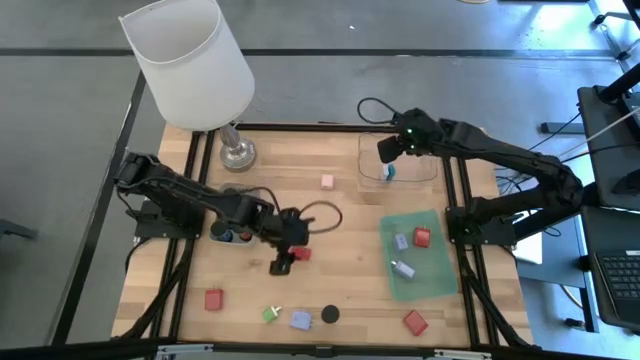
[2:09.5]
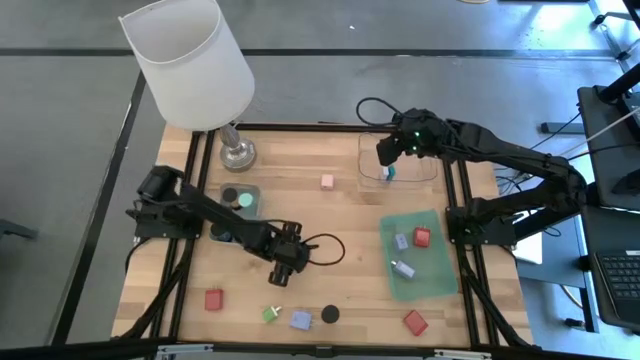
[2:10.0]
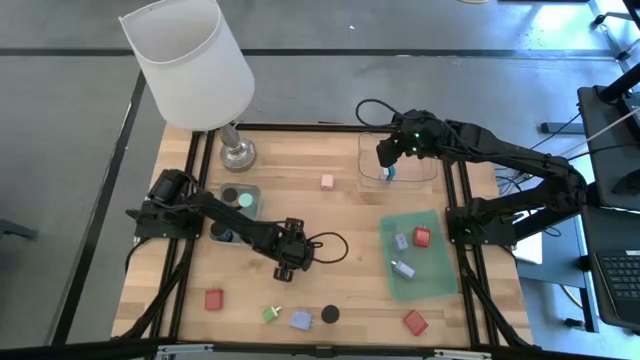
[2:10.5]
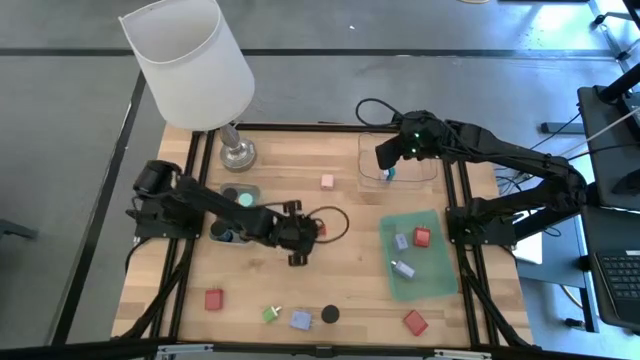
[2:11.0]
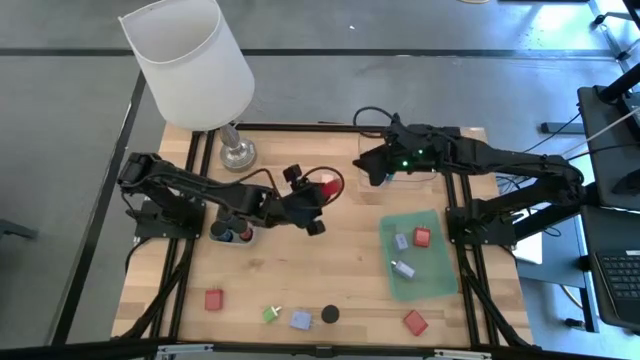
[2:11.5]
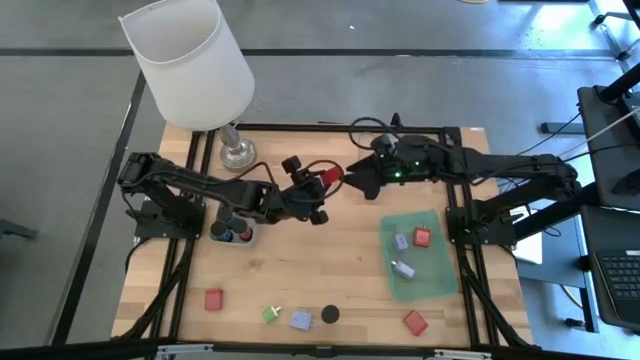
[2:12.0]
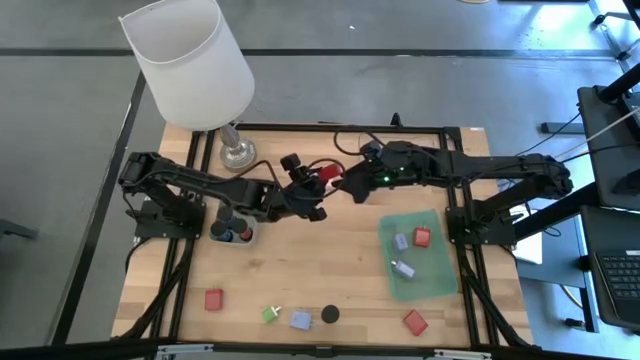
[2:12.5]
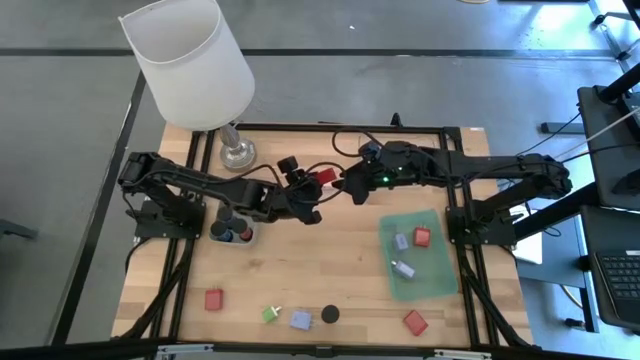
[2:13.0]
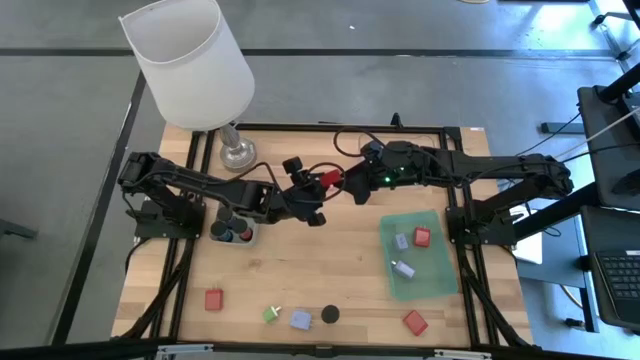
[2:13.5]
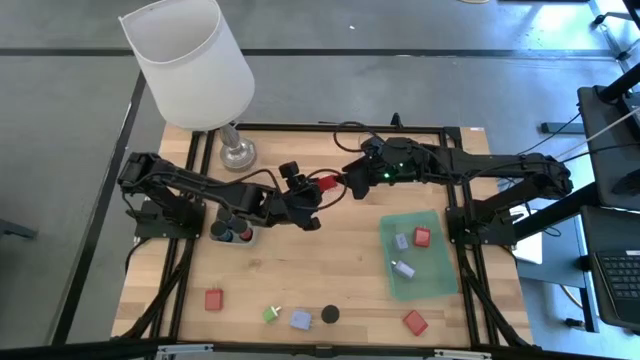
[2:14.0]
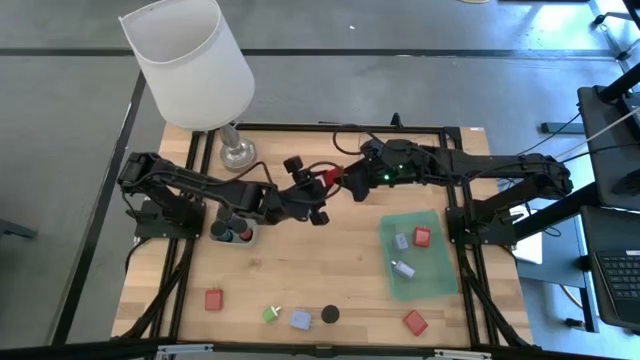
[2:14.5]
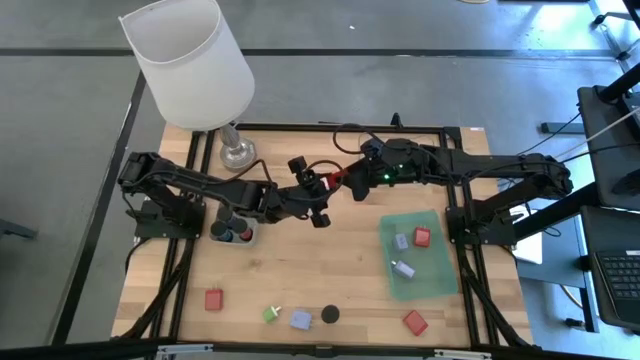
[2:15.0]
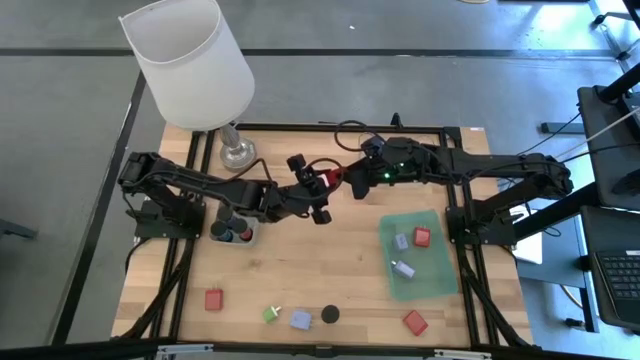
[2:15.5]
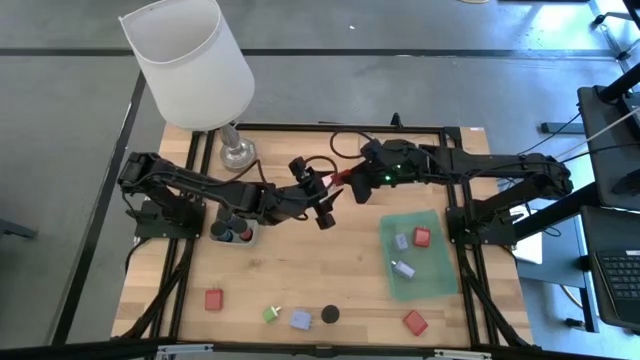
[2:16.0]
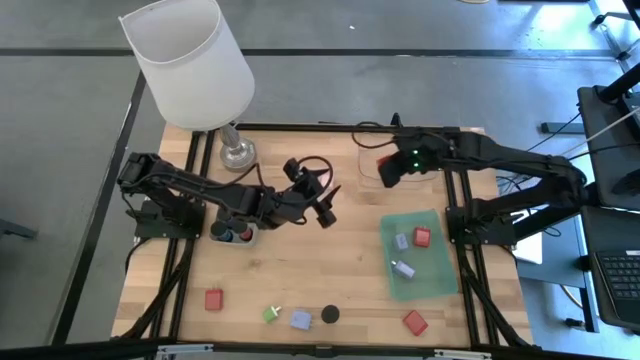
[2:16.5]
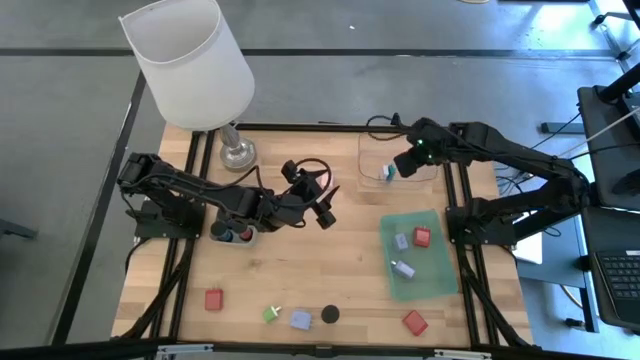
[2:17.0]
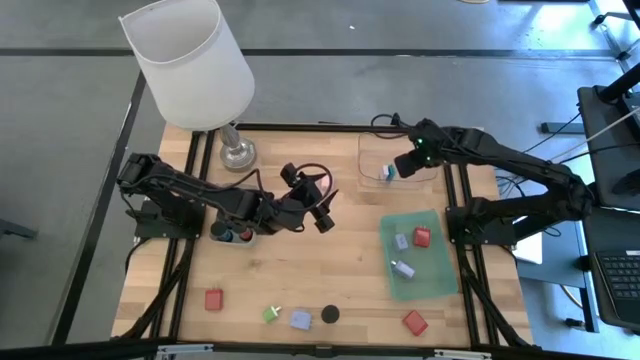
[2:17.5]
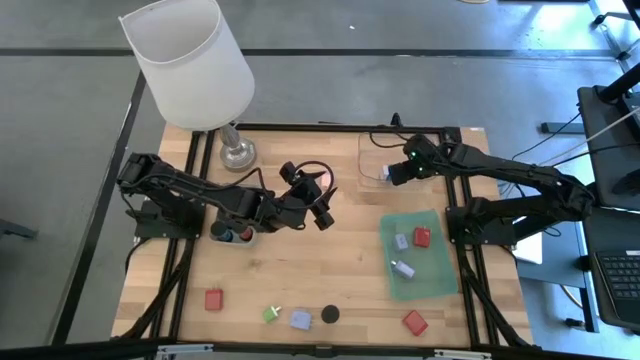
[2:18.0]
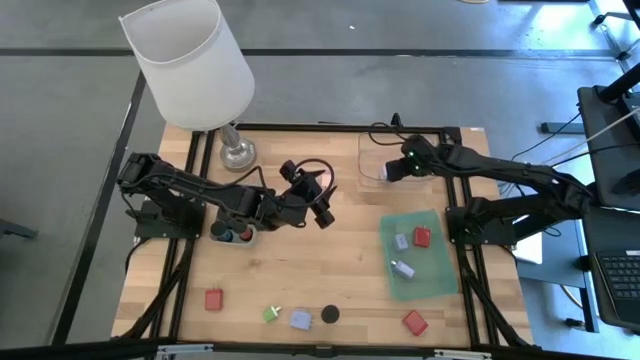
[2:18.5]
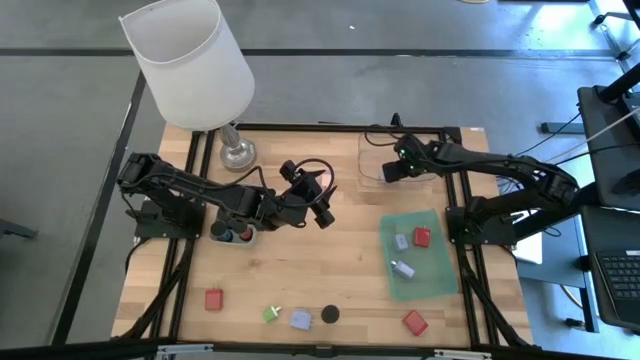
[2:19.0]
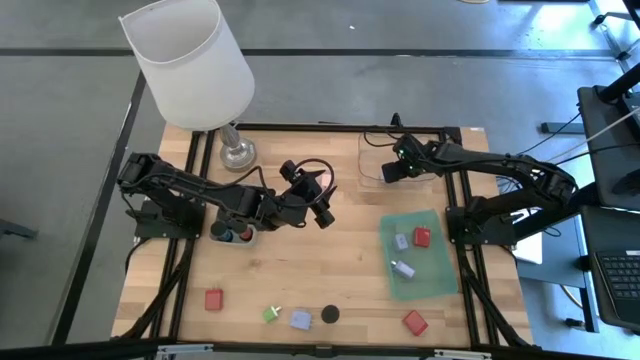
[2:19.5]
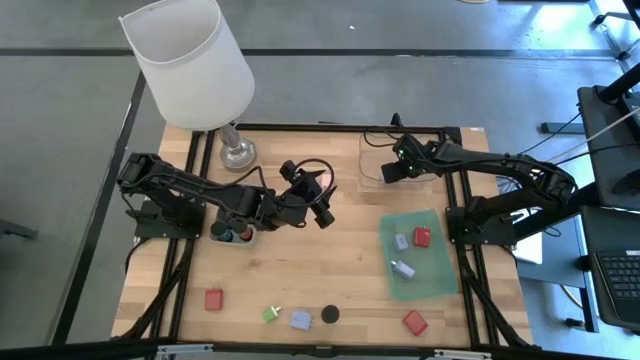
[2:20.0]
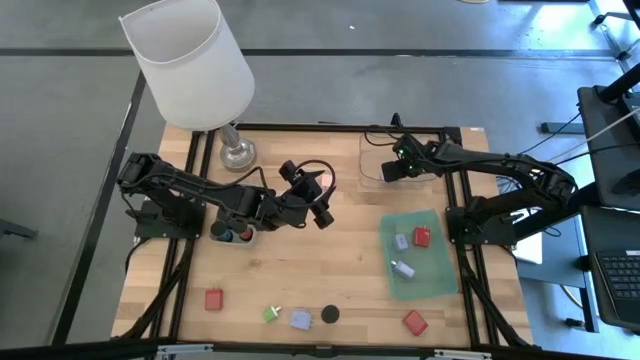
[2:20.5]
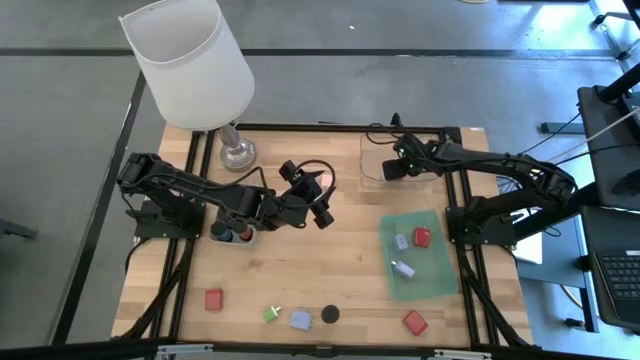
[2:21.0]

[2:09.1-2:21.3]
Task: Pick & Place Office items
Put the red digital timer into the transparent bin

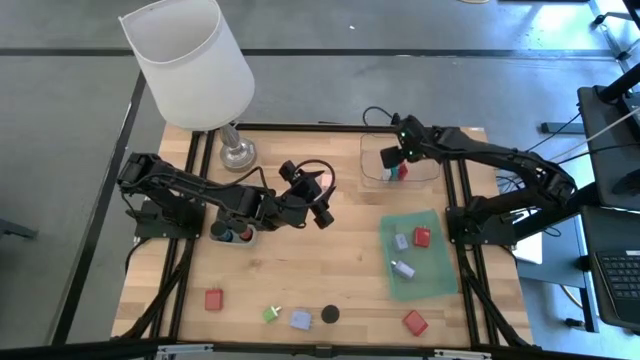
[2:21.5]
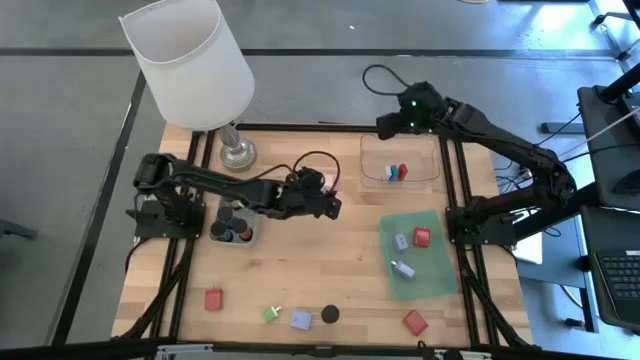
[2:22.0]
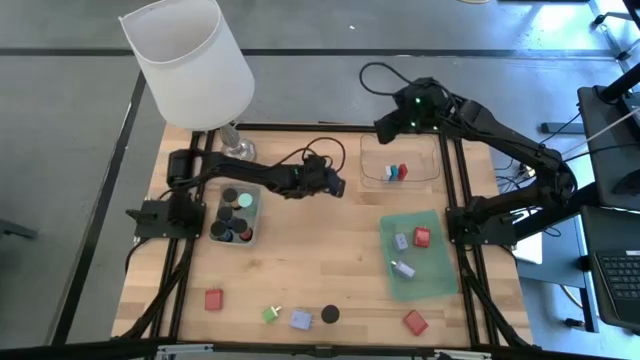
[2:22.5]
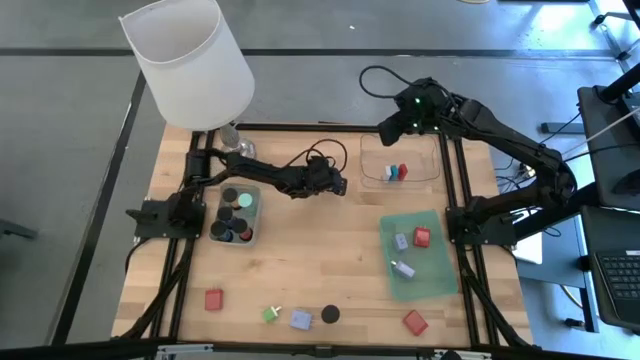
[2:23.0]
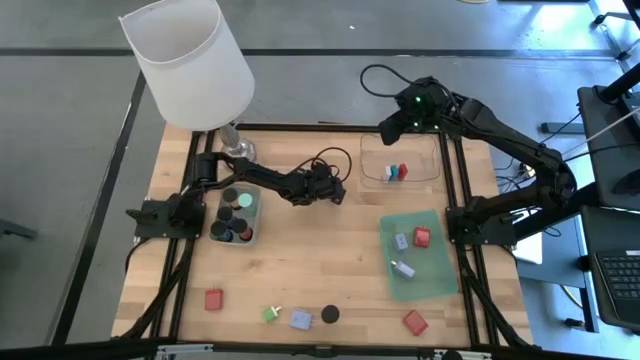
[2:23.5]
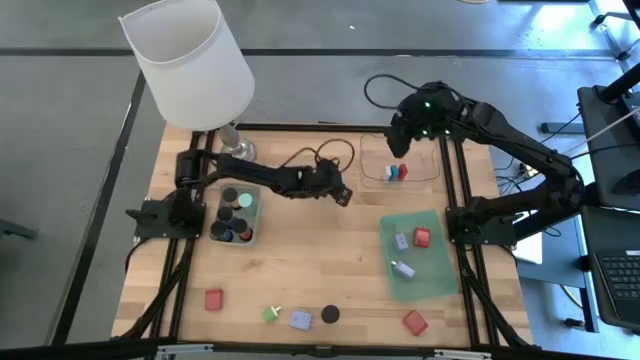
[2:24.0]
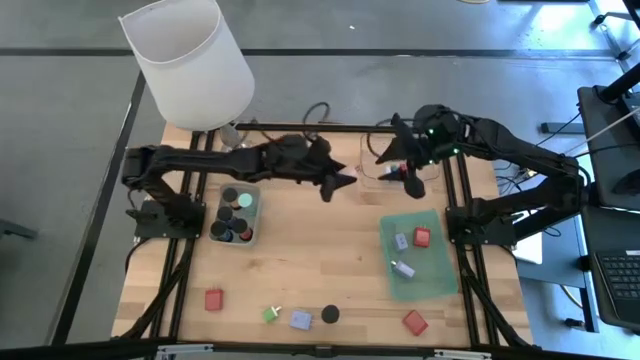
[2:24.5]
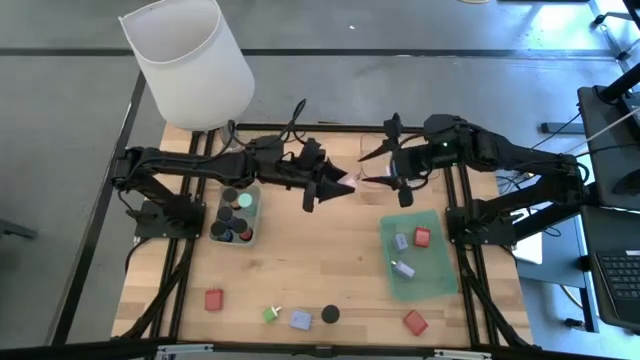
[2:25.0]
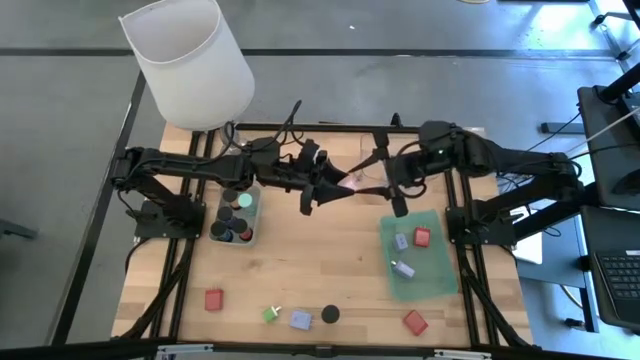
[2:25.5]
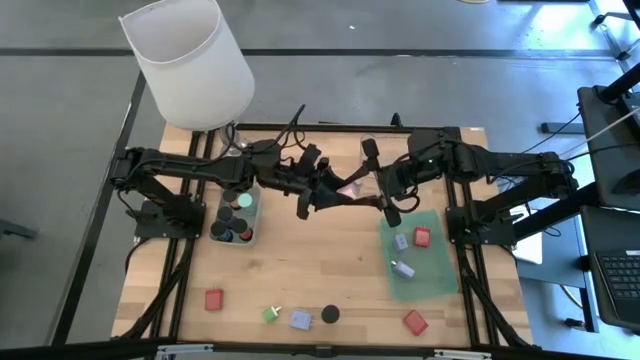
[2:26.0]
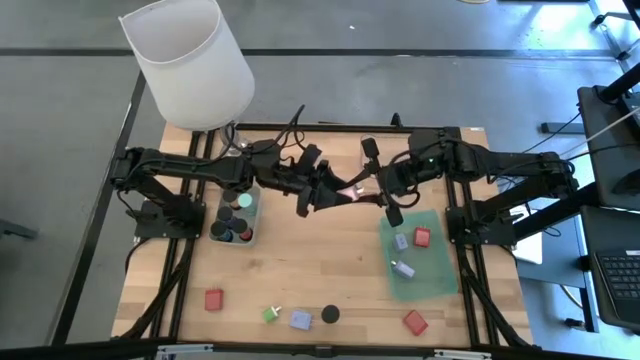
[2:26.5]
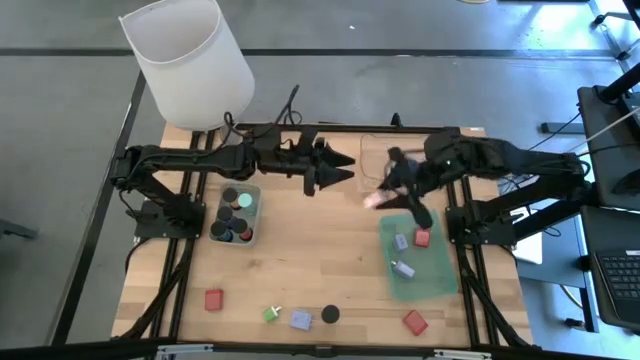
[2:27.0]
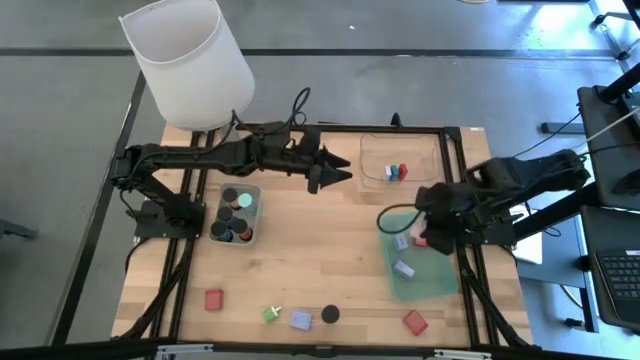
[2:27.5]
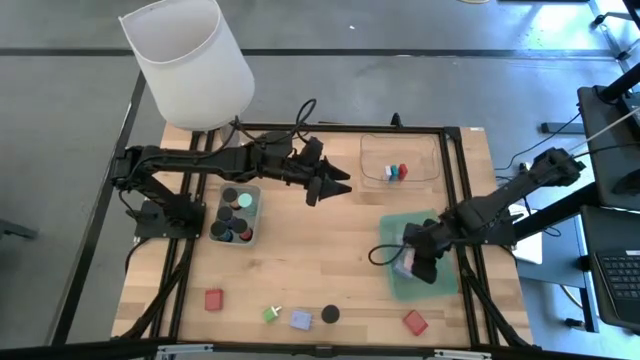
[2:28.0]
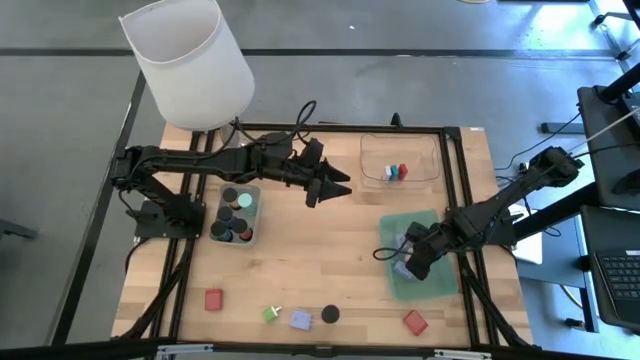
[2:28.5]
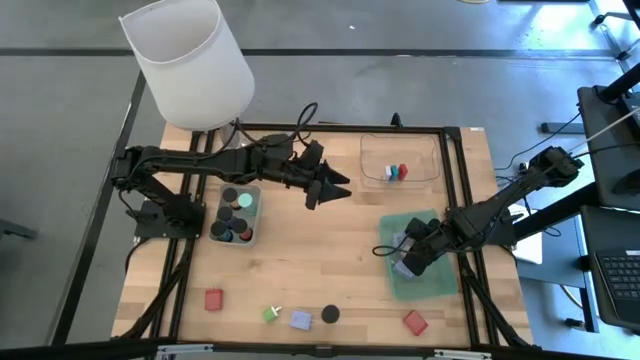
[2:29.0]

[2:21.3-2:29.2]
Put the pink charger adapter into the green bin

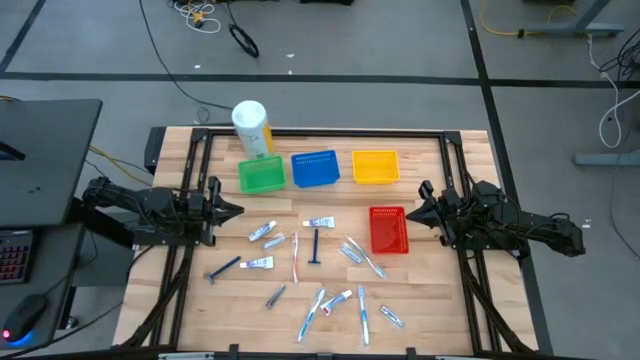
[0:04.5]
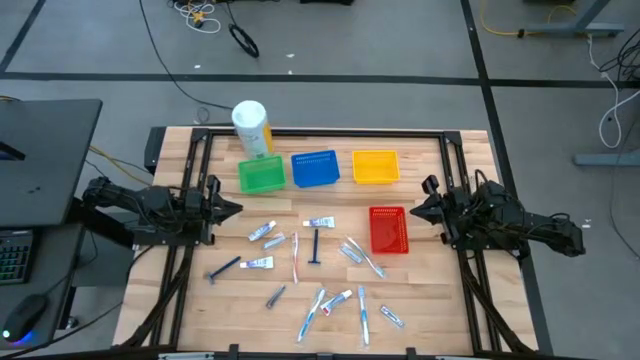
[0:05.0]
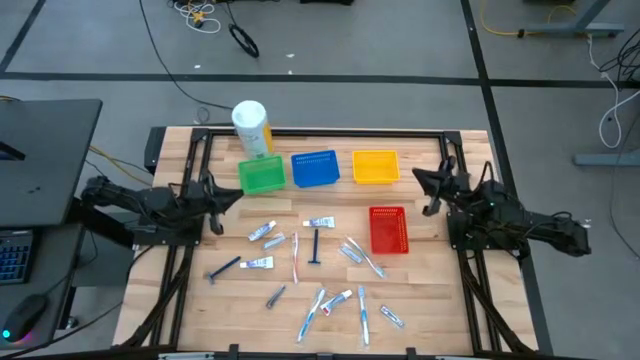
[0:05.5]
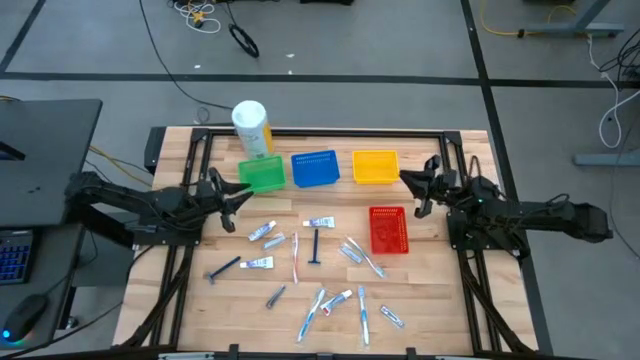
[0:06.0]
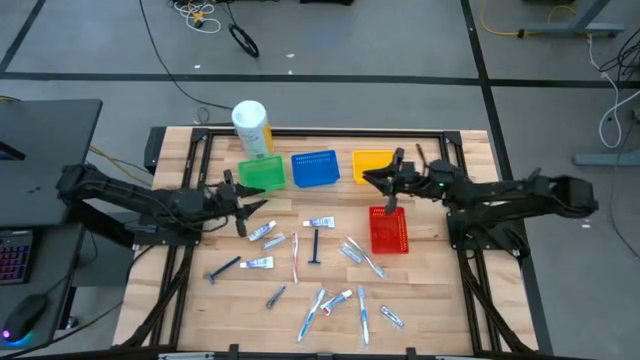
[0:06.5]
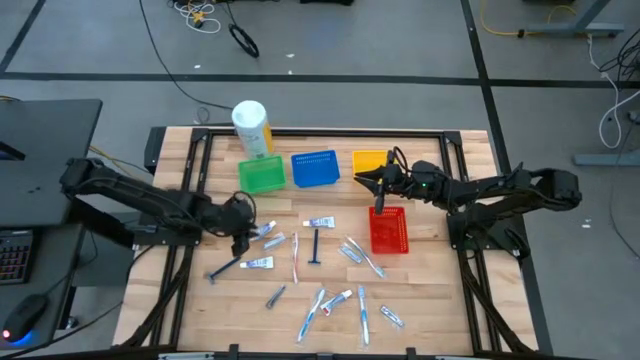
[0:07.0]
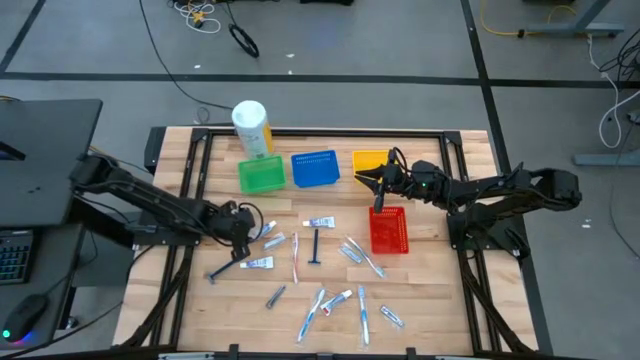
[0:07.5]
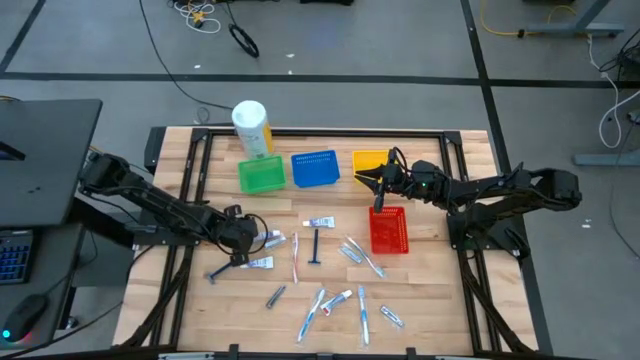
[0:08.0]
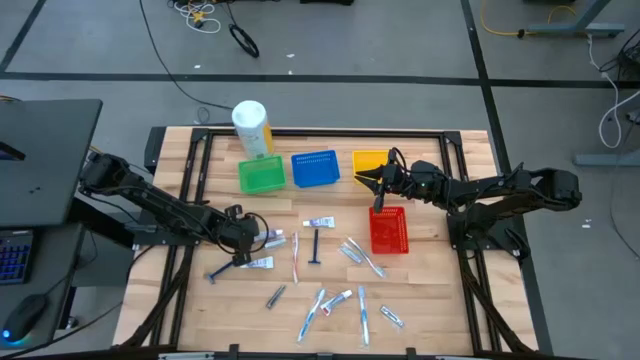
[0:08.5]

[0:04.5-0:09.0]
Task: Pick & Place Travel size toiletries
Put the white toothpaste into the green bin
